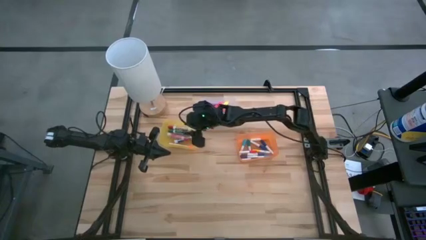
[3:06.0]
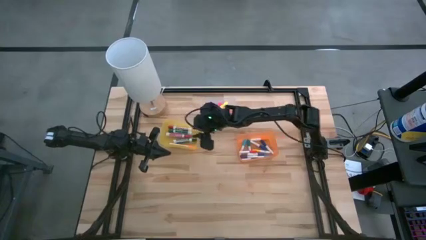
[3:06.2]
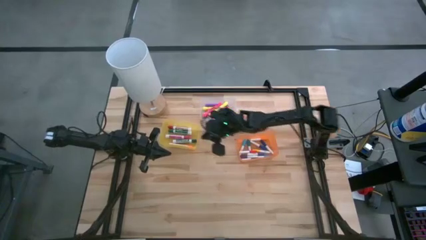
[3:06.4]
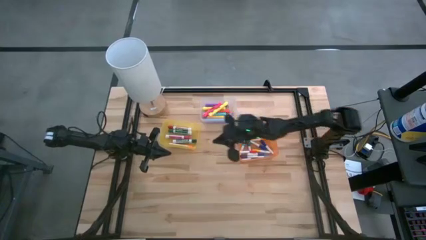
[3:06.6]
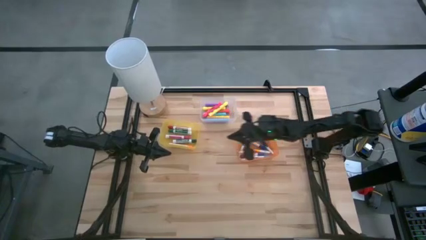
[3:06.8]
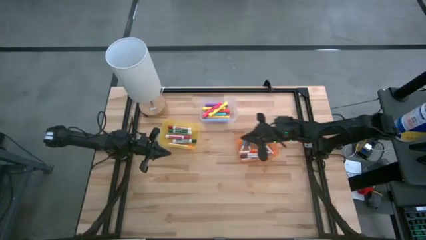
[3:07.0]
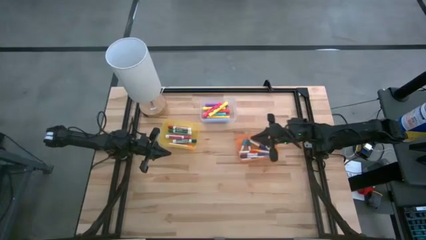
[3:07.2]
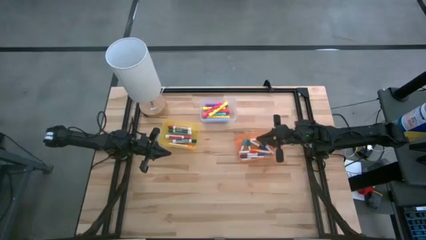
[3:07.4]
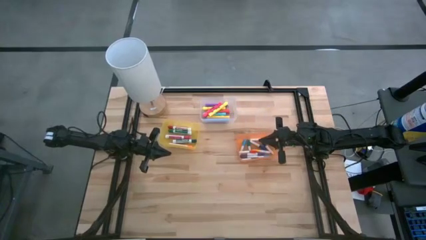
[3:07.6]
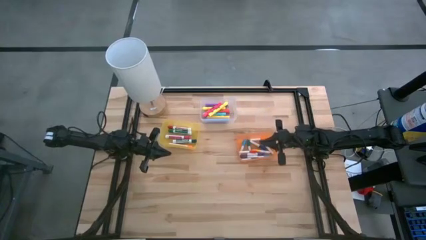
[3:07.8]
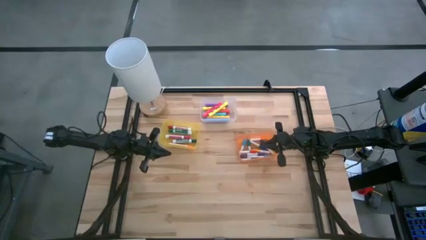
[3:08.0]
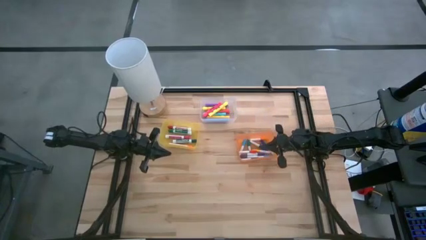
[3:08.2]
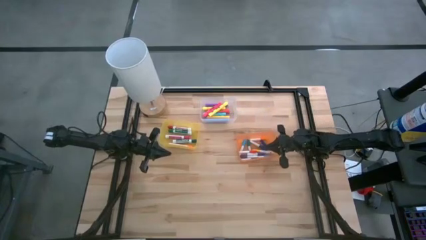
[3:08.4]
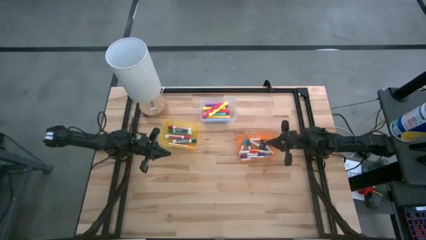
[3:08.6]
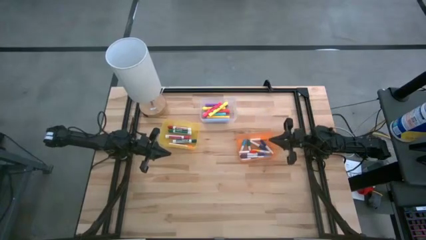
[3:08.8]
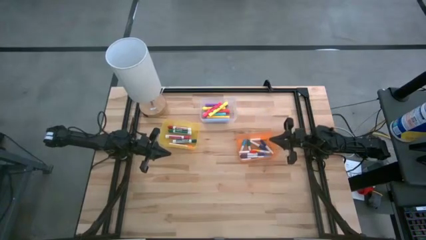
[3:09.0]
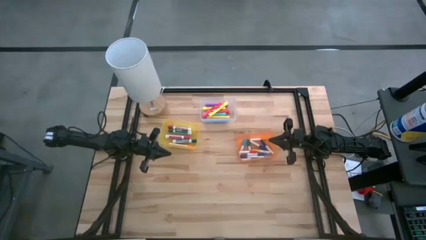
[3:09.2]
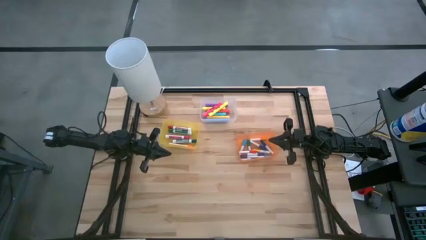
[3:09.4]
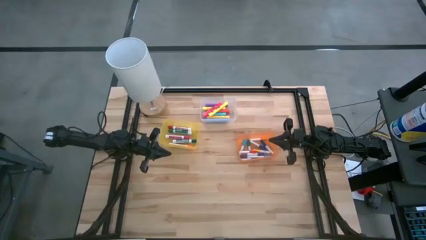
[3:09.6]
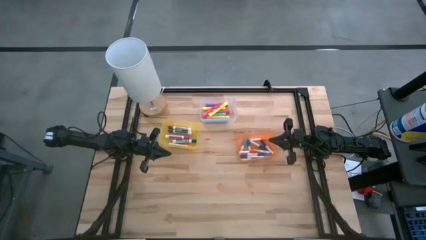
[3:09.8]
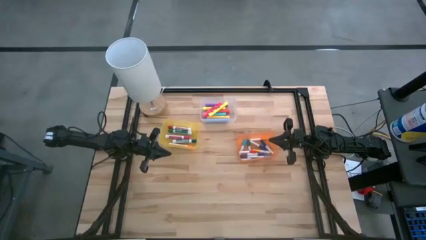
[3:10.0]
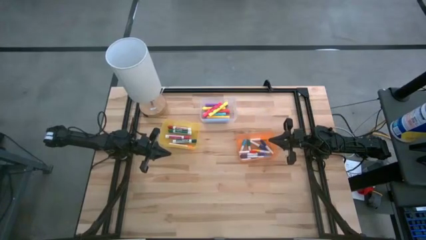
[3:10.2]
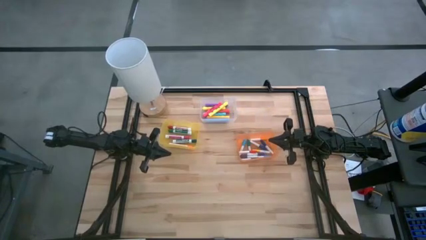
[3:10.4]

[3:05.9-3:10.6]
Task: Pick & Place Markers
Return to Home Position

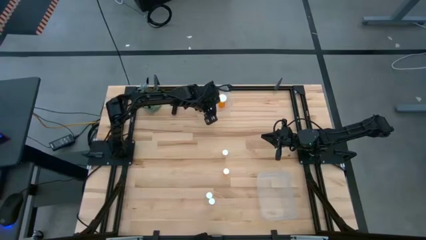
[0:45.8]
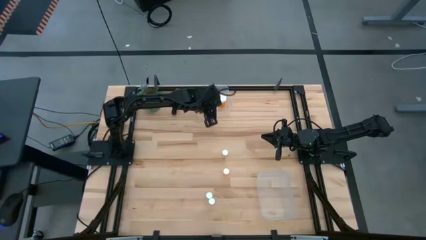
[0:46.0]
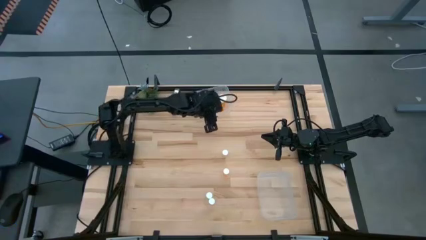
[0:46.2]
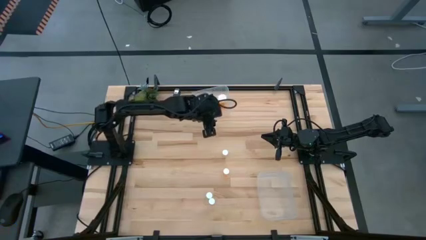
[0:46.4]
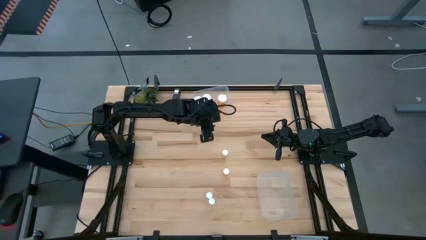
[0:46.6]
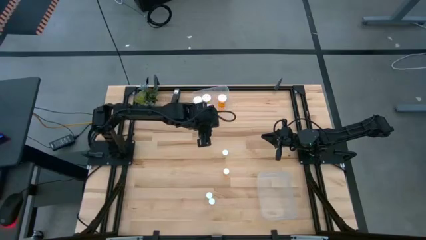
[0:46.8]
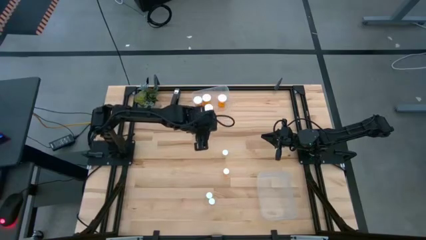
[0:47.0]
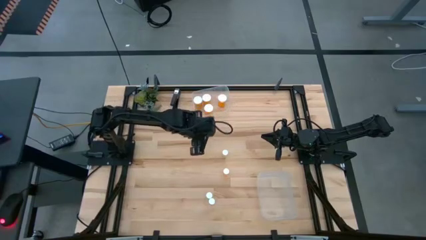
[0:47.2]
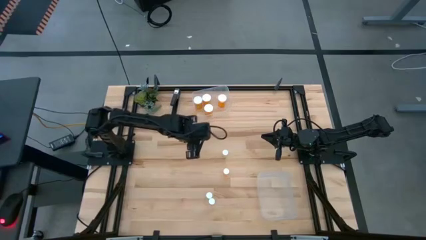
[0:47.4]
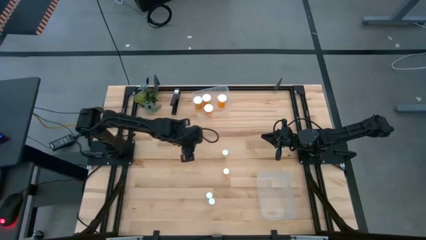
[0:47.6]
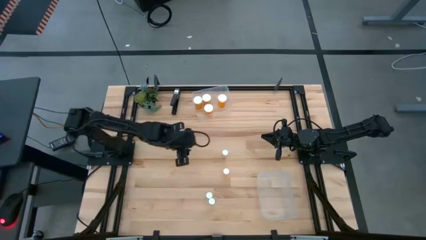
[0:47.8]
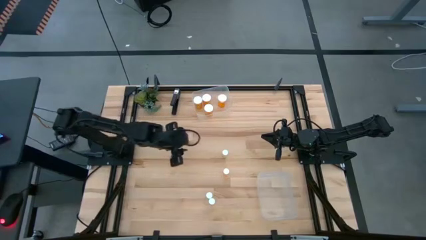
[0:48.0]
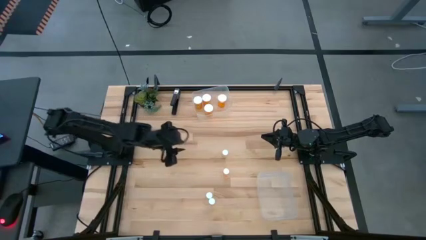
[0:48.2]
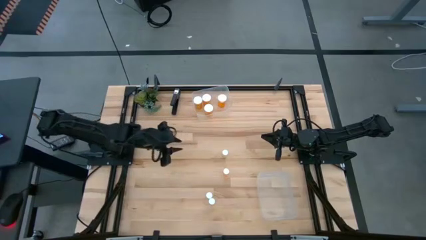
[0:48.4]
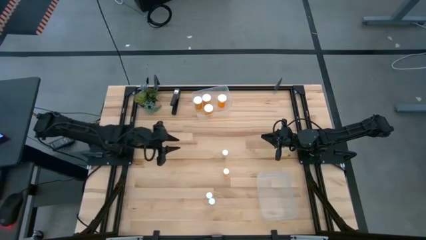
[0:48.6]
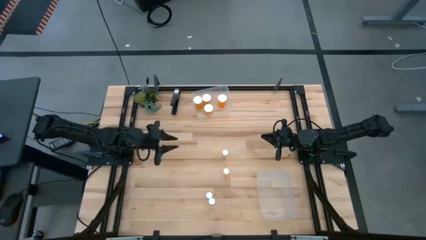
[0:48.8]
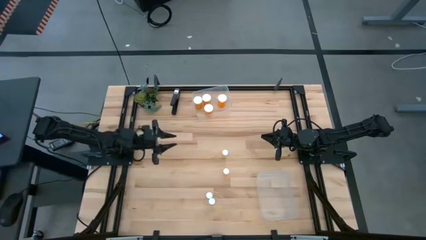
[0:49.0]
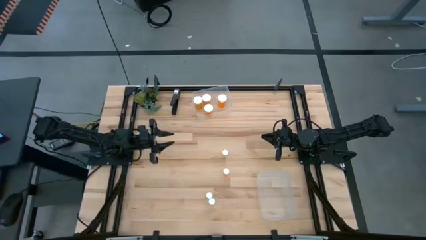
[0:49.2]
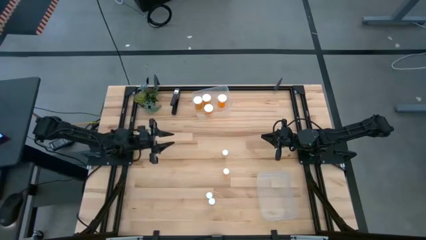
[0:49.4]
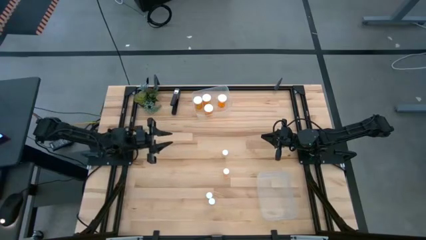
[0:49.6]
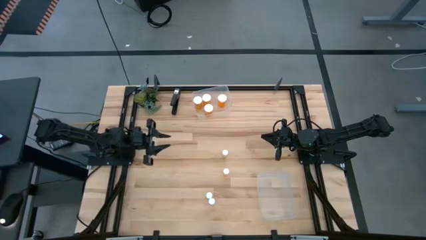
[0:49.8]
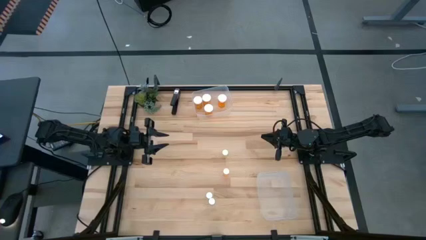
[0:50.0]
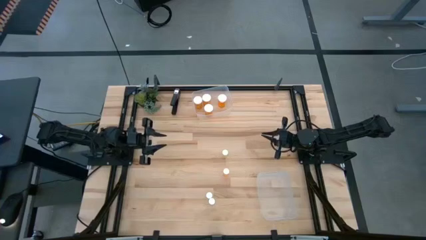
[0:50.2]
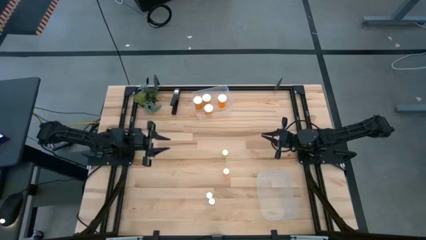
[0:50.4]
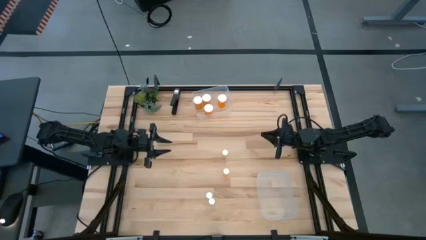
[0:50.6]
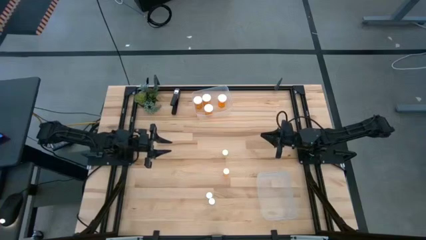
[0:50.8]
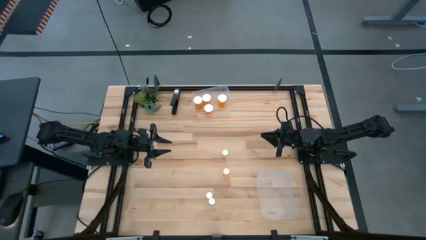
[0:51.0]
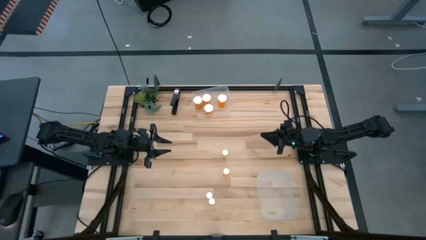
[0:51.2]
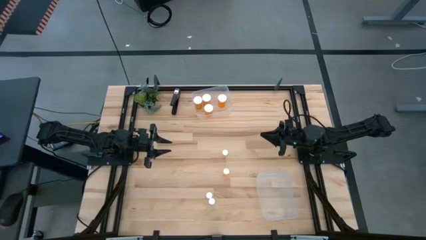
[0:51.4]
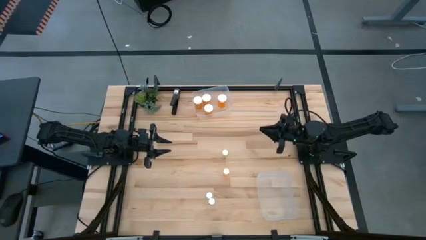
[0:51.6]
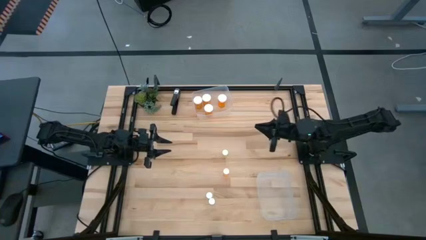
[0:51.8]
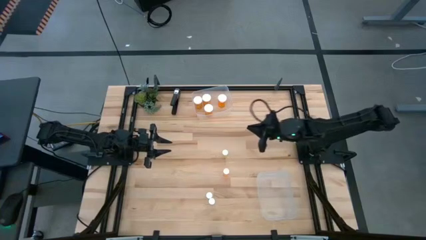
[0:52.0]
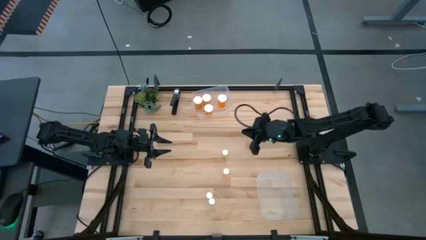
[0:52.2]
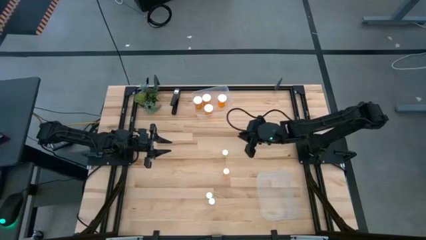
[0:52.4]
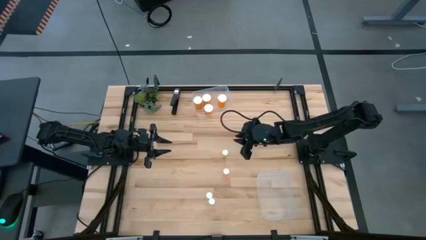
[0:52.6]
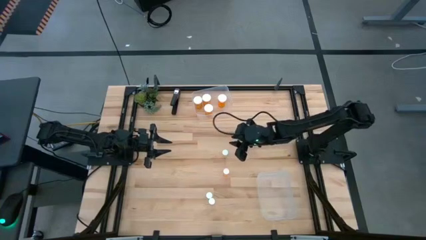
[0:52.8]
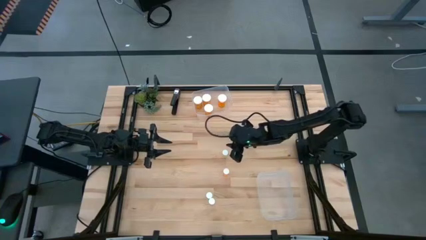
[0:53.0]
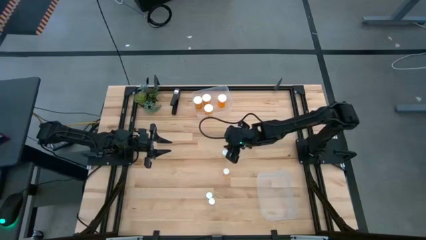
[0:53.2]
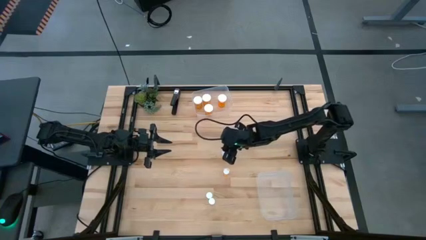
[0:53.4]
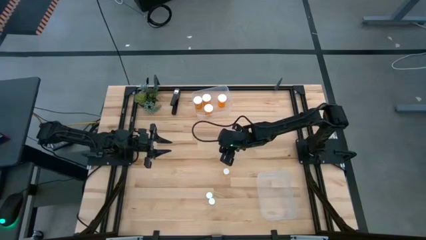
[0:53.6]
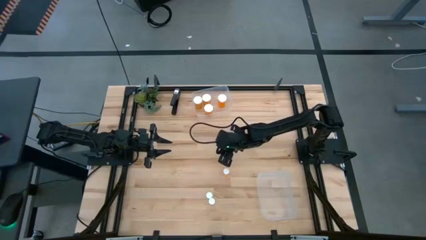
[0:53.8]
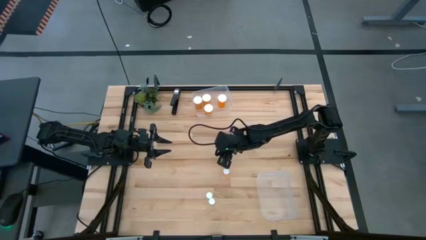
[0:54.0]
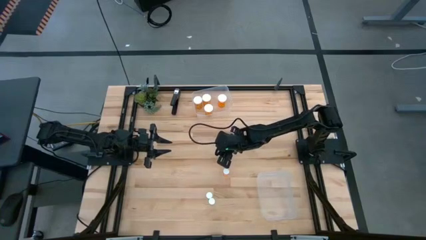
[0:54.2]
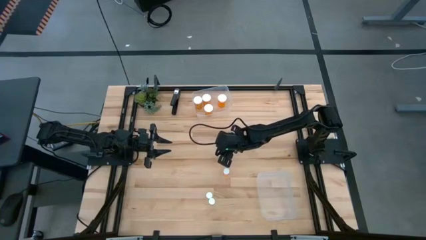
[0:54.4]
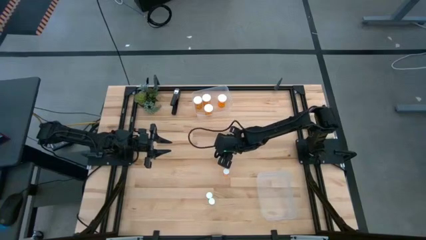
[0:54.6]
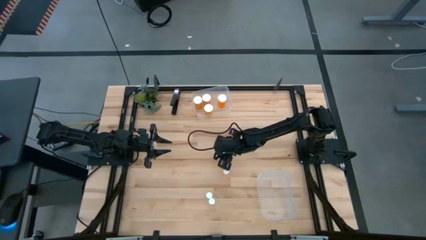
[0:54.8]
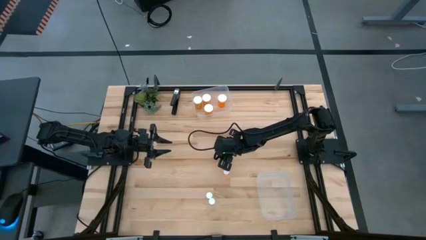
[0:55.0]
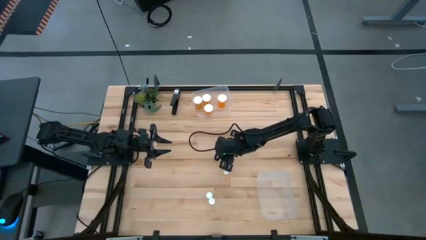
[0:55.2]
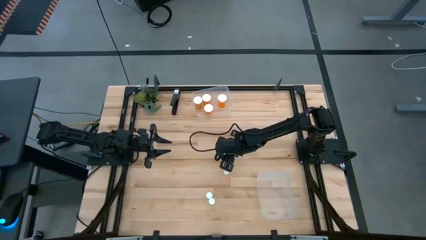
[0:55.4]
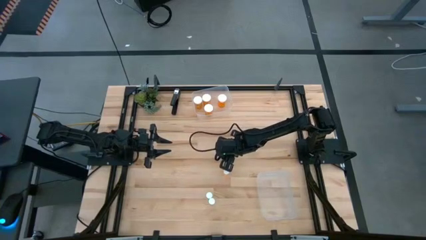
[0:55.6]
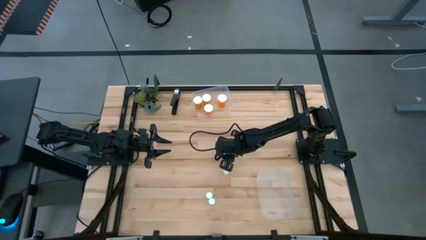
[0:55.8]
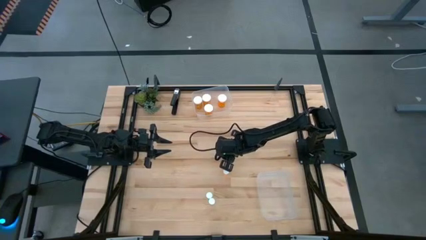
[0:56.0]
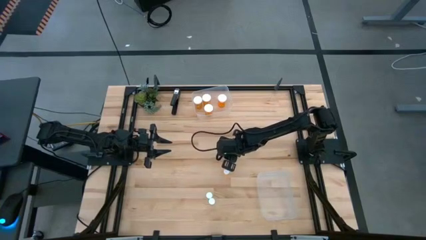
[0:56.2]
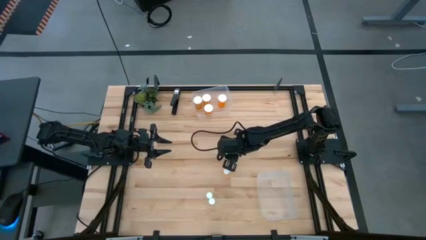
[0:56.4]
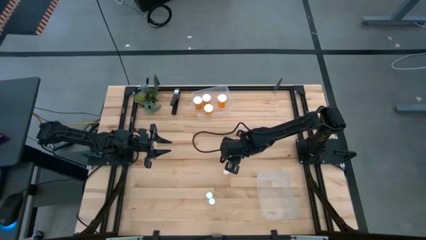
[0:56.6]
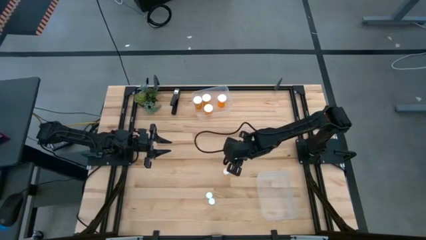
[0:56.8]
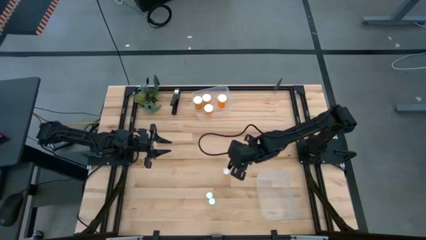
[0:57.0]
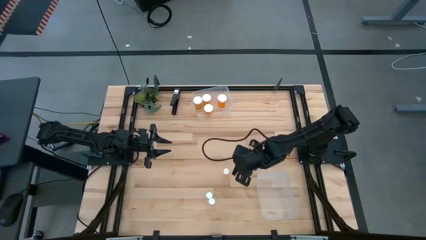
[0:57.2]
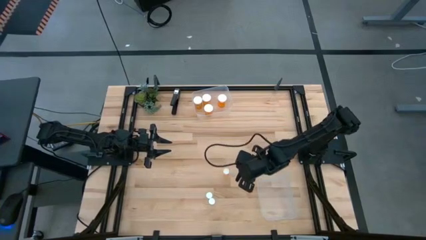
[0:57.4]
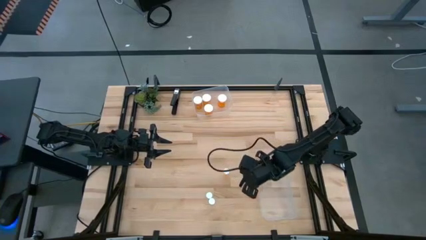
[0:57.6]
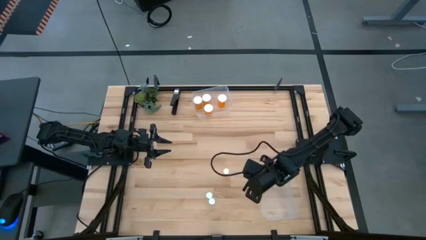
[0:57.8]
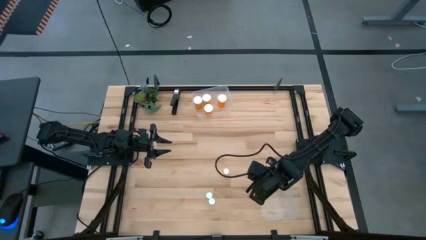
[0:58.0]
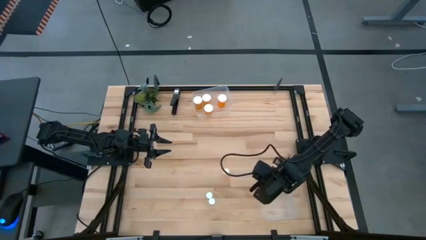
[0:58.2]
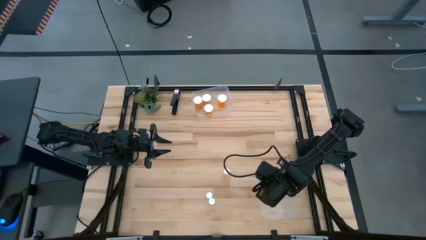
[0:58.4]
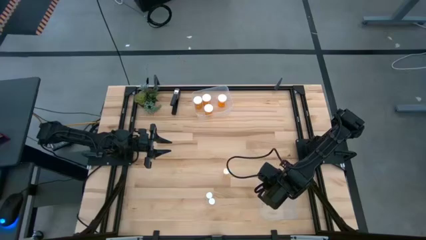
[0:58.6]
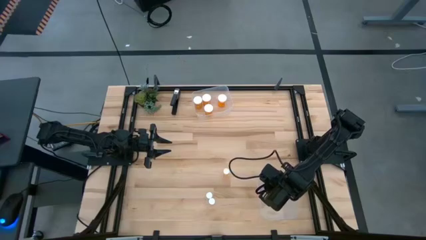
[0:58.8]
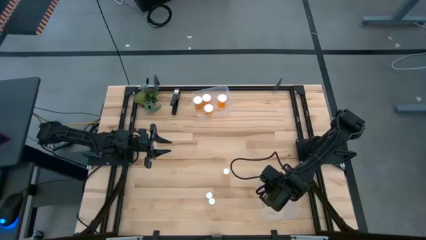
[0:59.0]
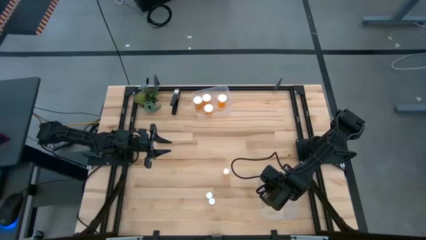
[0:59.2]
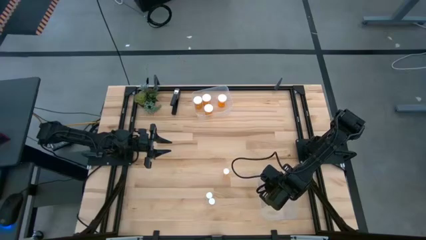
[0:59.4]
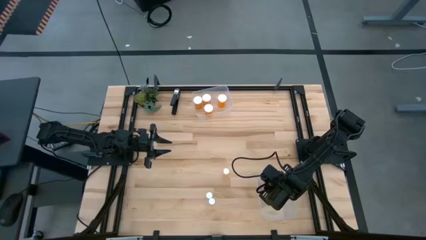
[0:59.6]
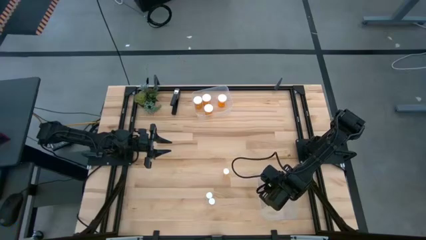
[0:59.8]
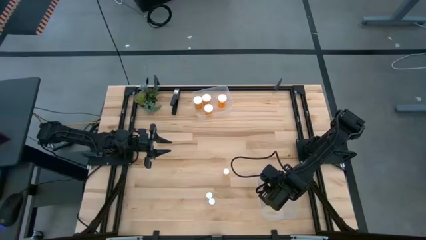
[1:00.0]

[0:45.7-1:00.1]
Task: Pick and place medicine bottles into bin by pill shape (circle, oval)
Put the small transparent pill bottle into the bottom transparent bin
